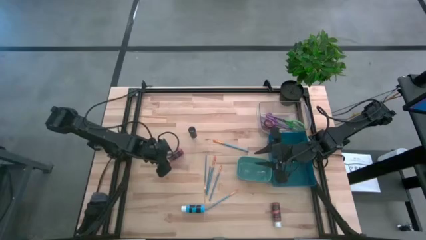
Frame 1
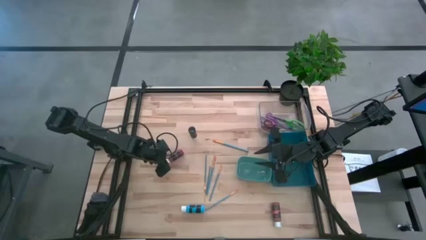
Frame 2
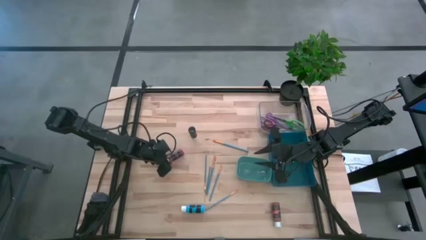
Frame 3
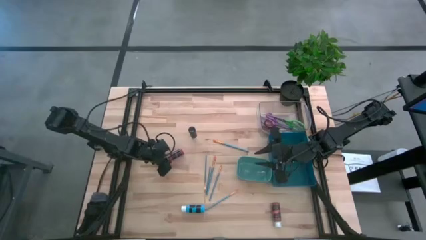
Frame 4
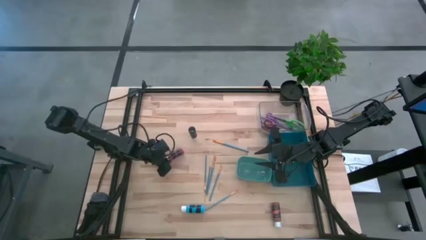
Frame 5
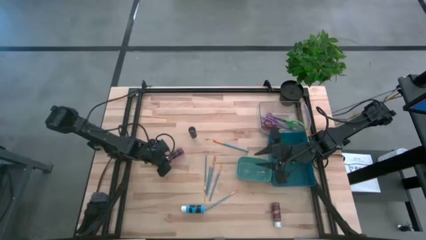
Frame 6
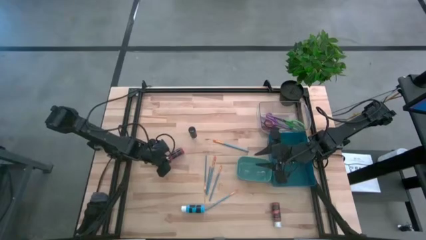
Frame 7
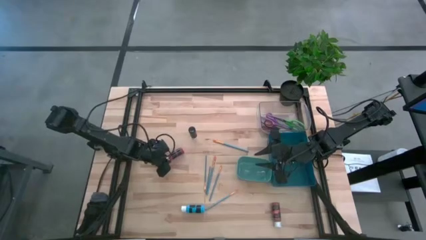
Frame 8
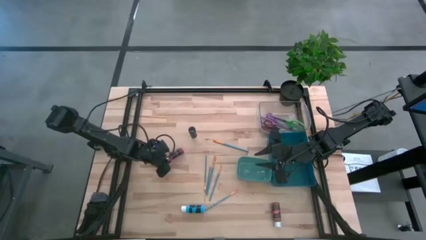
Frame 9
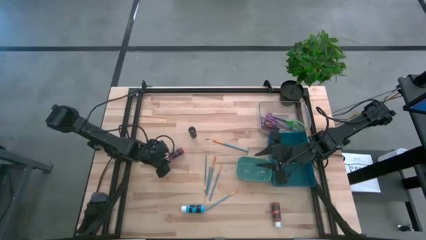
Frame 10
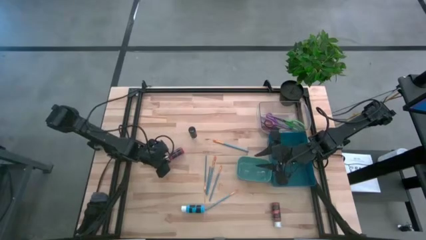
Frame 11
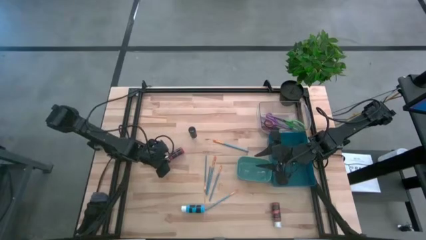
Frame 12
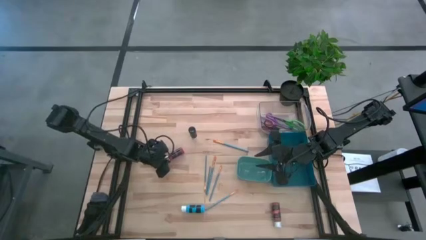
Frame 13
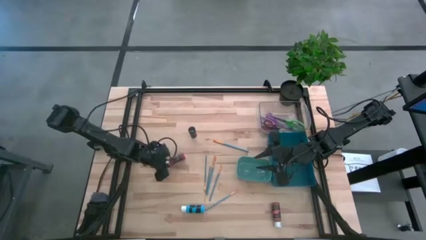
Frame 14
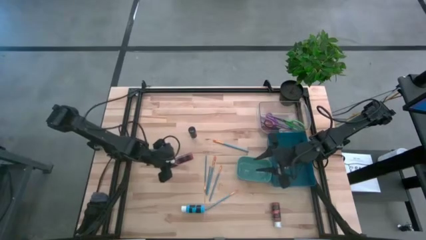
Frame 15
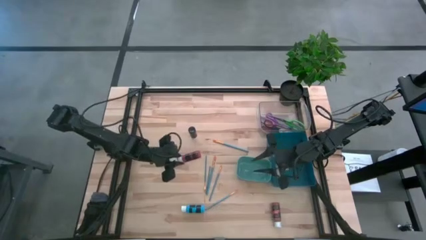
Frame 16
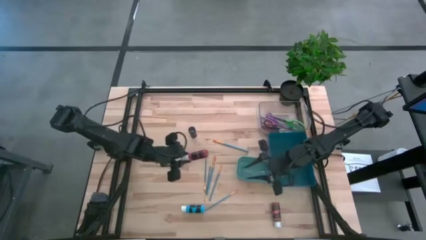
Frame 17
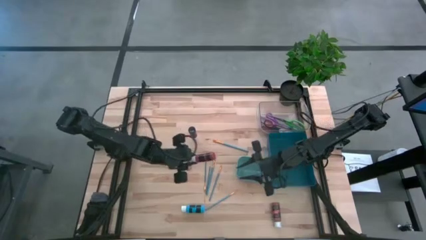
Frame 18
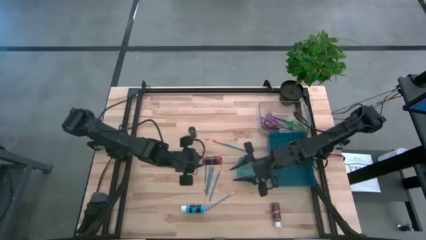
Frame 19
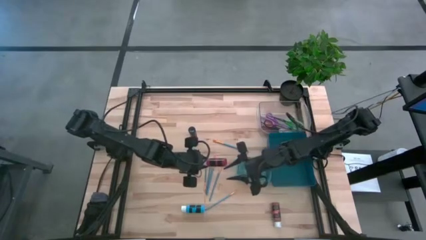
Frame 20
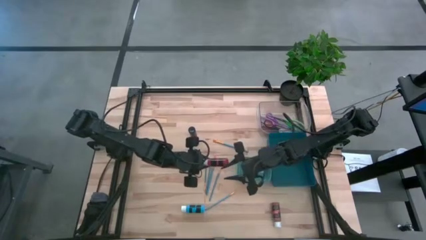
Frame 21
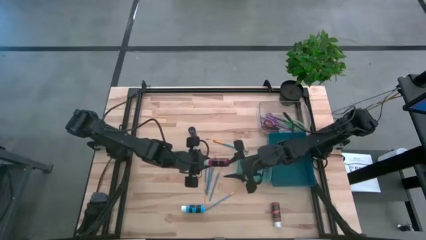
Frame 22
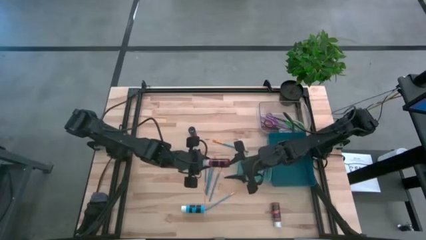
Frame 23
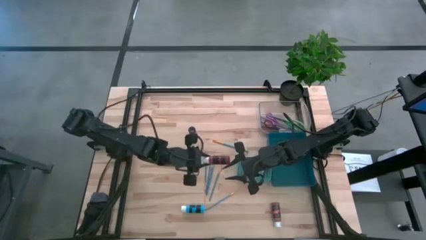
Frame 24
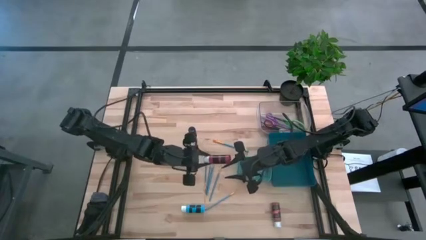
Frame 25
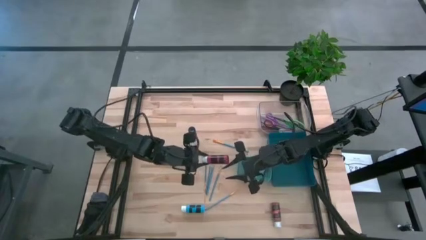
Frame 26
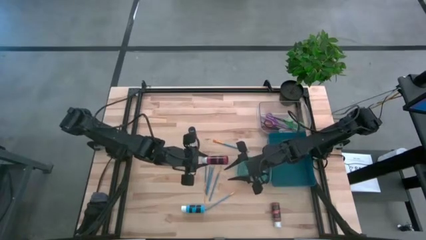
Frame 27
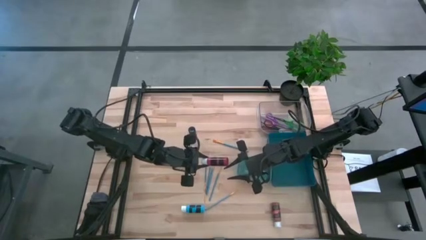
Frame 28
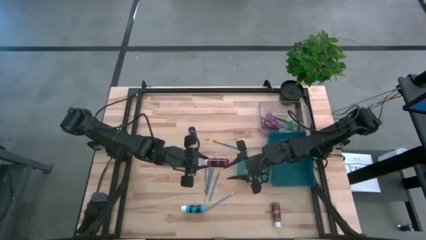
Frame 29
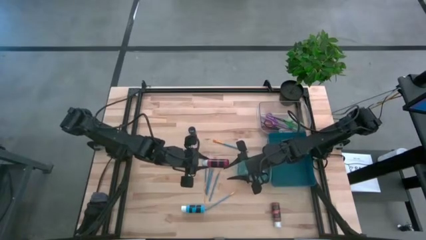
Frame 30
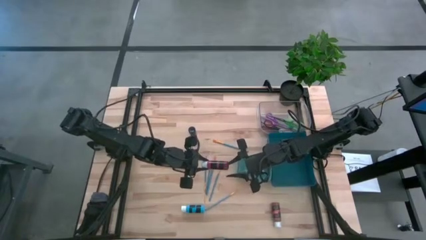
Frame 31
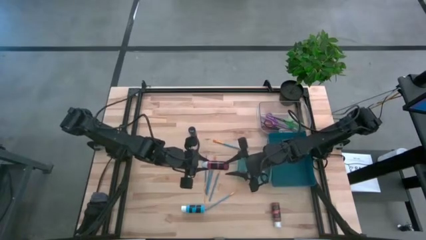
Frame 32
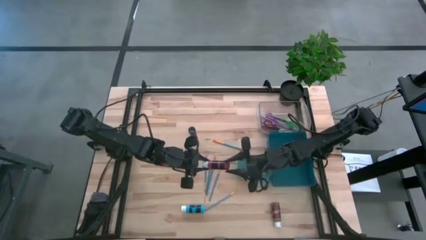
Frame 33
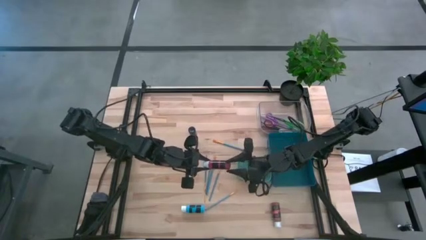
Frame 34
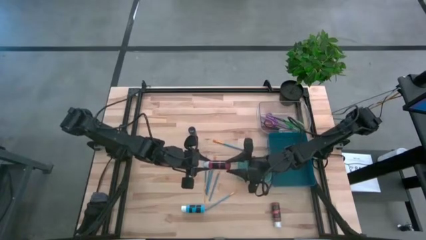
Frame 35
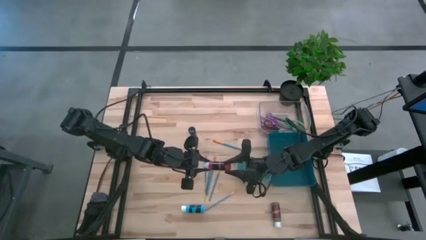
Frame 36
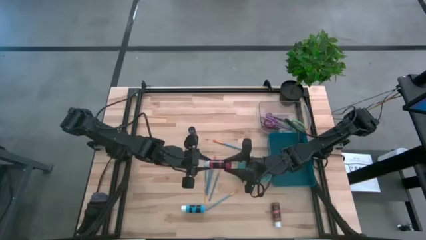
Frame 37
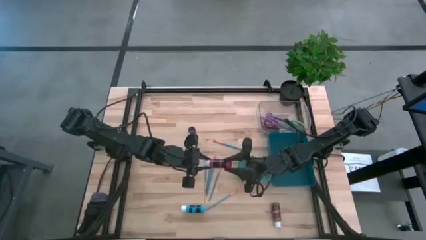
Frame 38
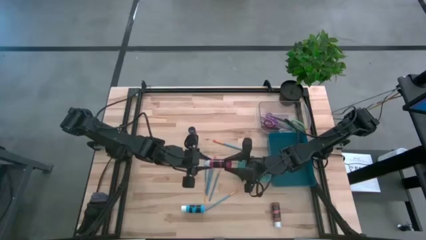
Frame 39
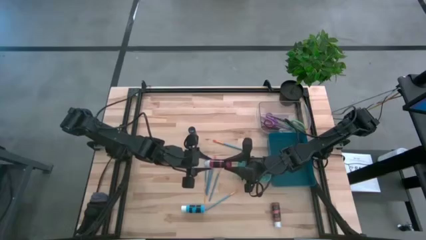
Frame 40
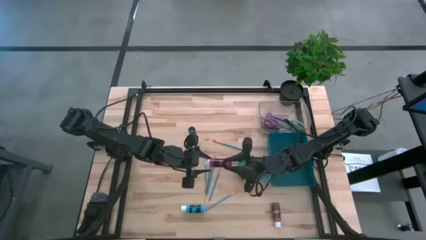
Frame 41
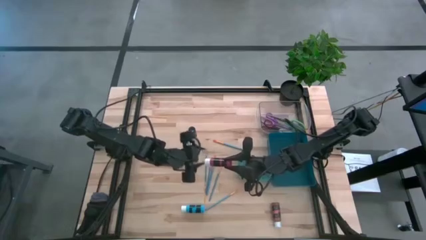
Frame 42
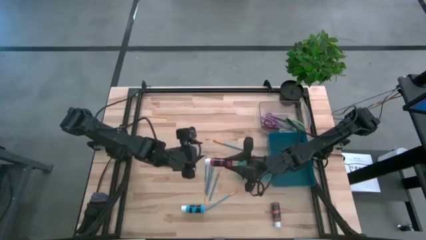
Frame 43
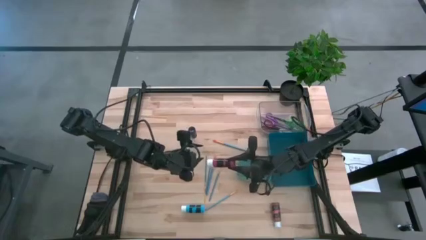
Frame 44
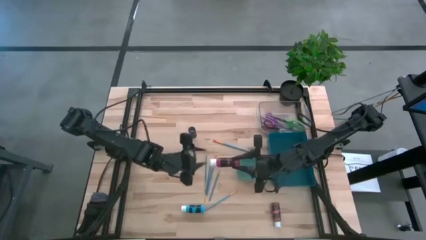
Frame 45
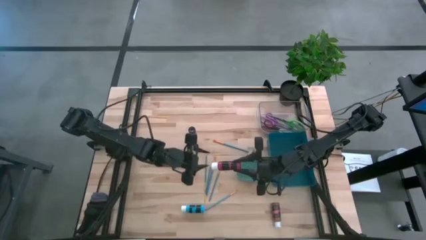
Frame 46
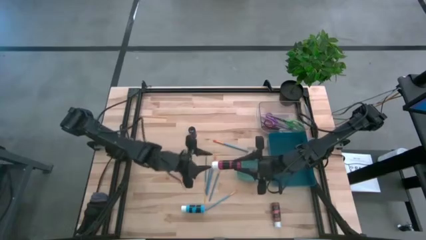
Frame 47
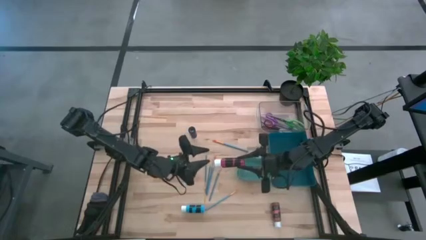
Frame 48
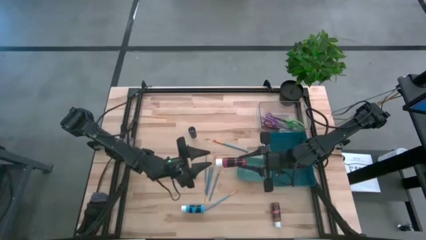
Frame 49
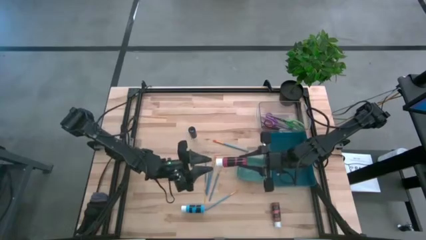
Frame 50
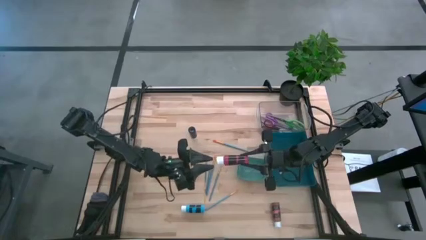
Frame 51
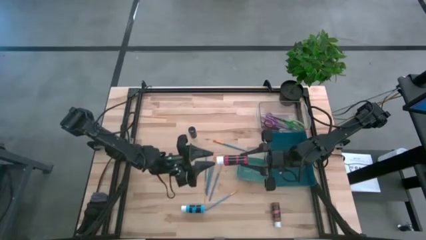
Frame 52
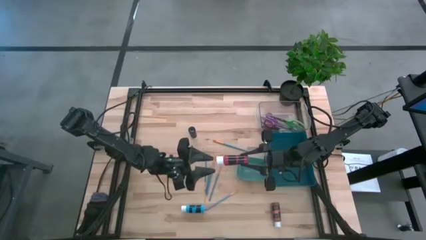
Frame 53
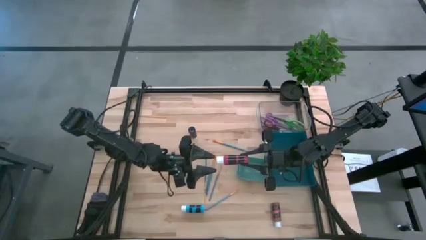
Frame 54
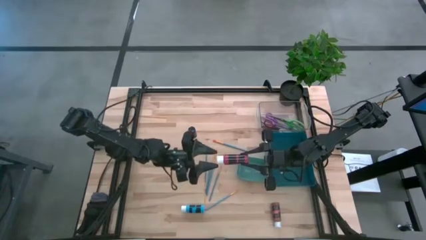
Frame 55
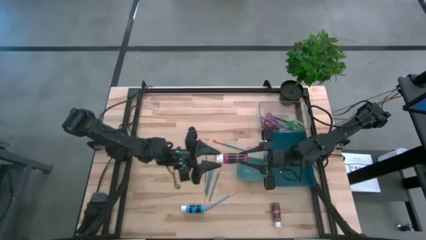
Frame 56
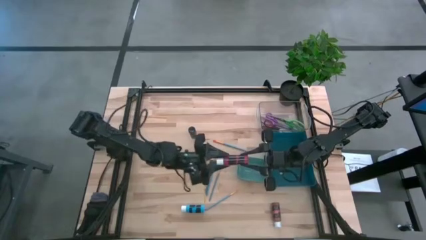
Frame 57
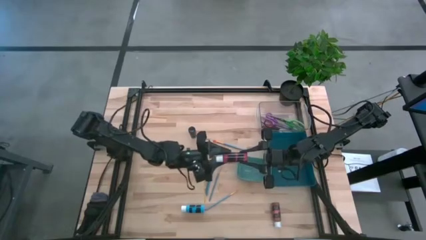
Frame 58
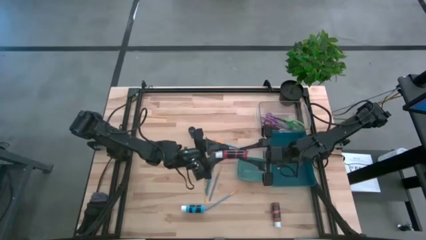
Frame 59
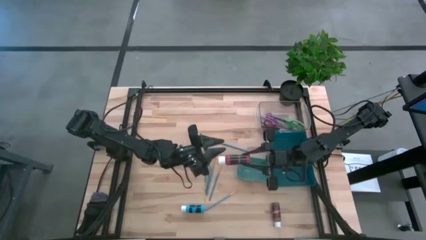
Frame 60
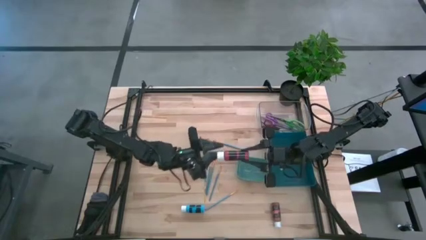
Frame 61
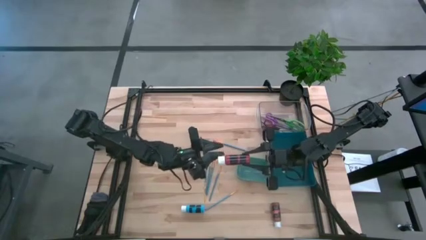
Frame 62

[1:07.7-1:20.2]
Task: Pick & Place Paint Supplies
Put the red paint bottle into the green bin

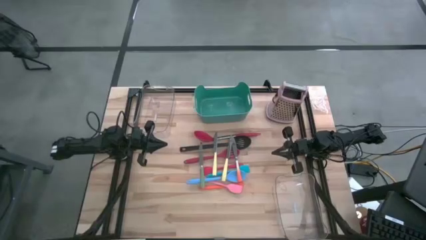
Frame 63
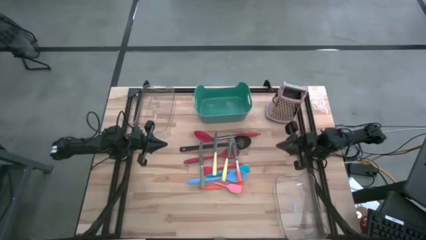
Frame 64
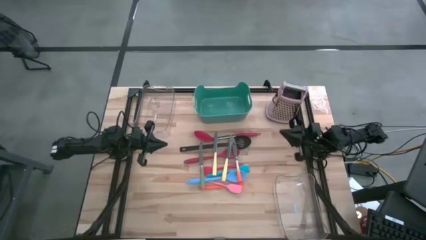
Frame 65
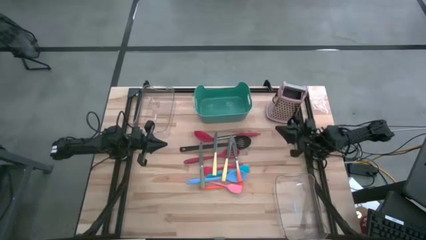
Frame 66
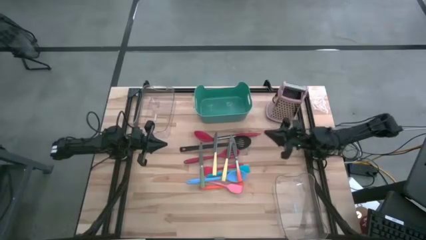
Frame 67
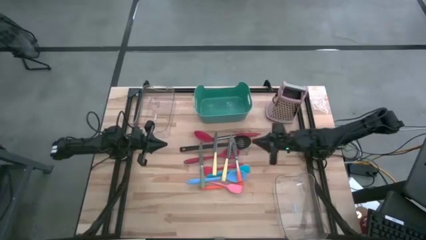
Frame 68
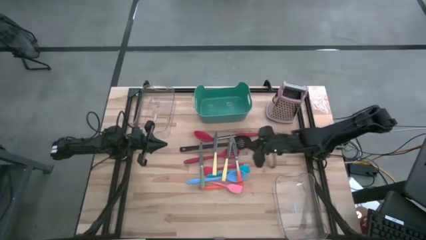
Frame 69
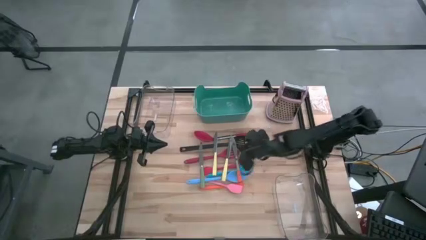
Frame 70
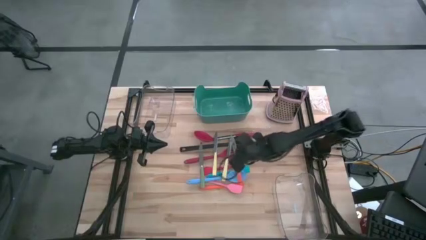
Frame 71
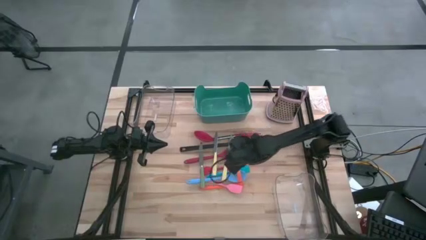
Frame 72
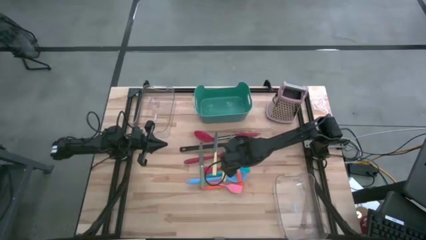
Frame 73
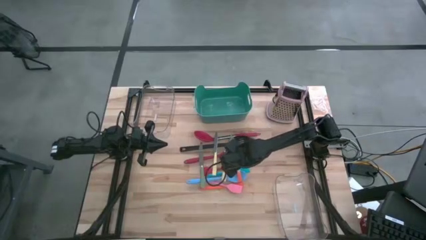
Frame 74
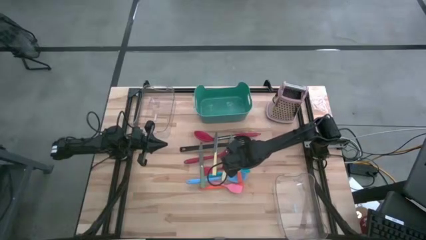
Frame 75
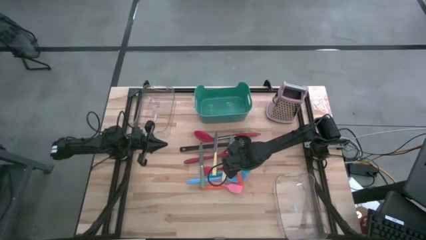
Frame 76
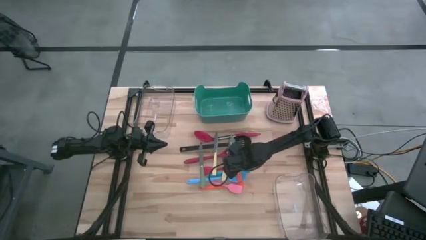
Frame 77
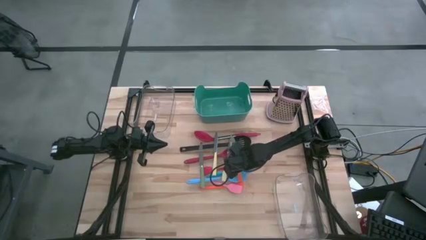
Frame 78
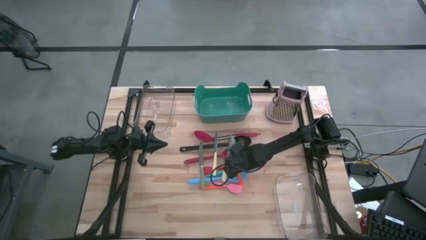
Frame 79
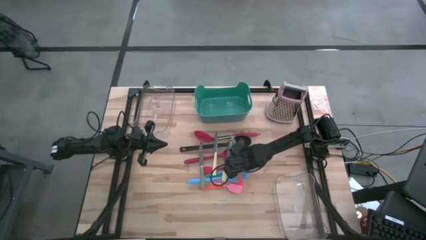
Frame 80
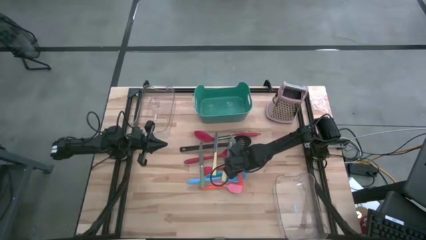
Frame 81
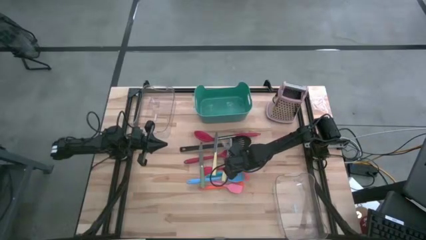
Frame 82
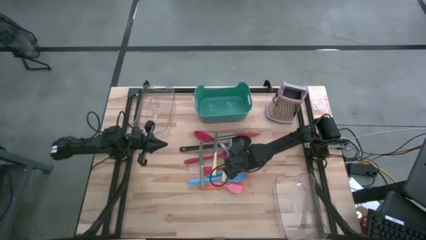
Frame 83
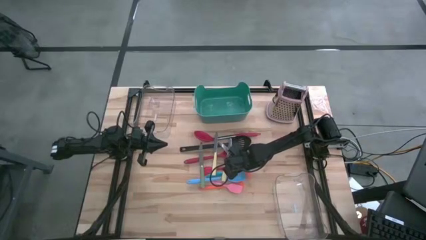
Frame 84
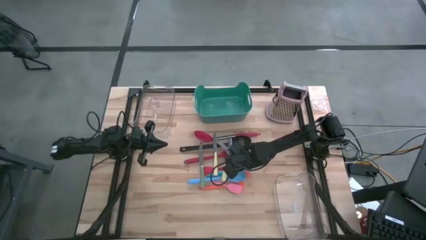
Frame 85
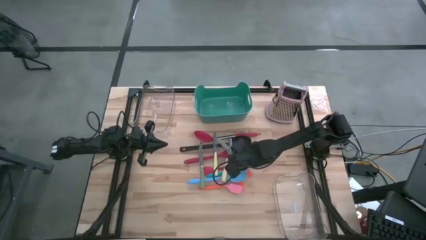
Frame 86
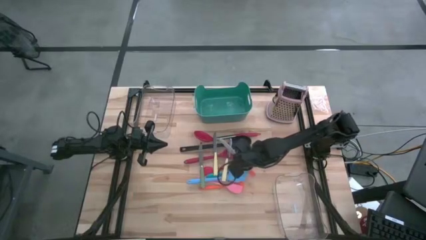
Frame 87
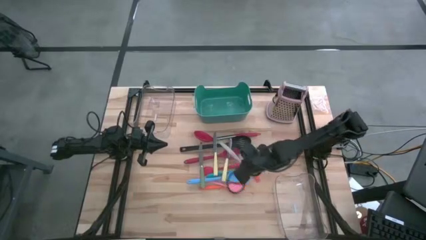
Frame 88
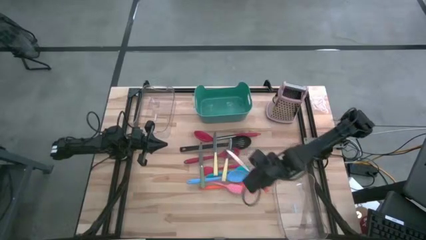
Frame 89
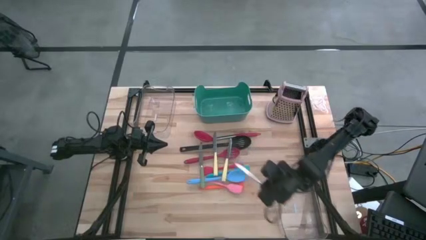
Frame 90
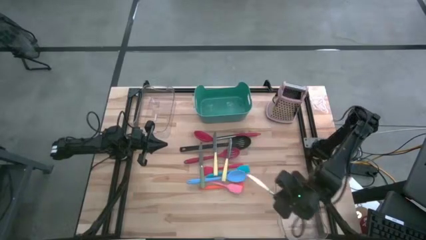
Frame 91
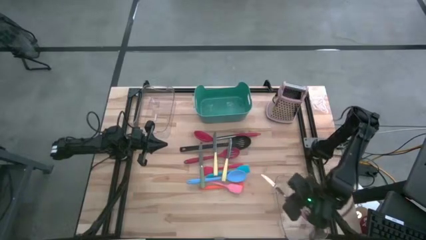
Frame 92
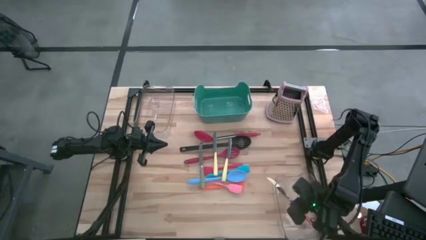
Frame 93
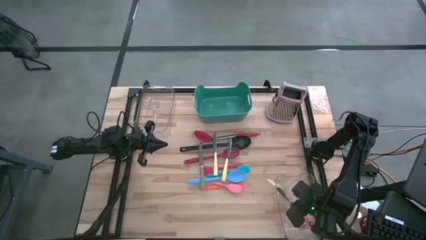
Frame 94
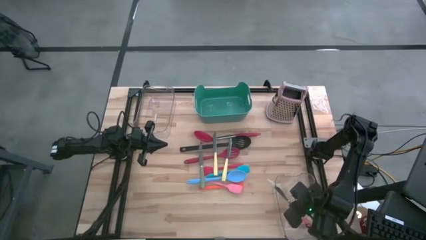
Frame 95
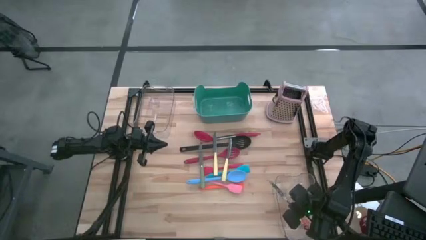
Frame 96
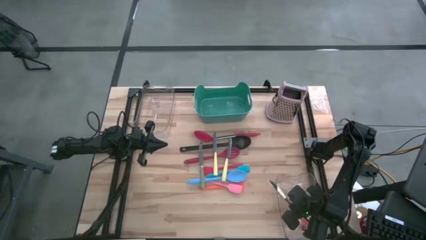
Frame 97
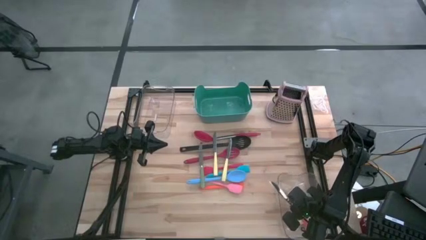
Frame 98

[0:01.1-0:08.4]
Task: Pick & Place Kitchen Items
Put the orange knife into the bottom transparent bin
